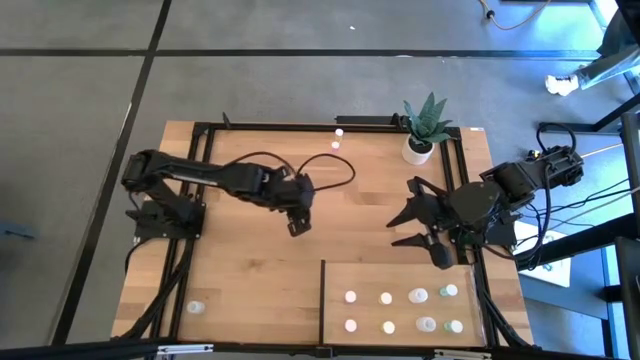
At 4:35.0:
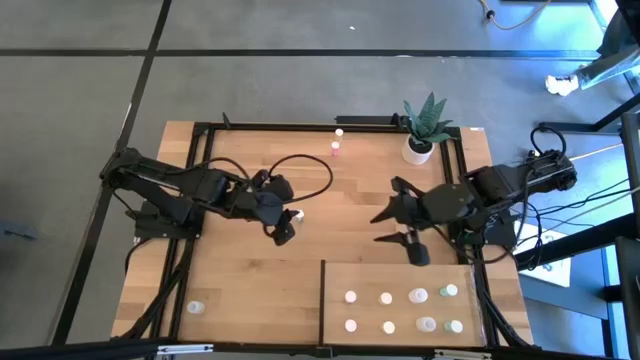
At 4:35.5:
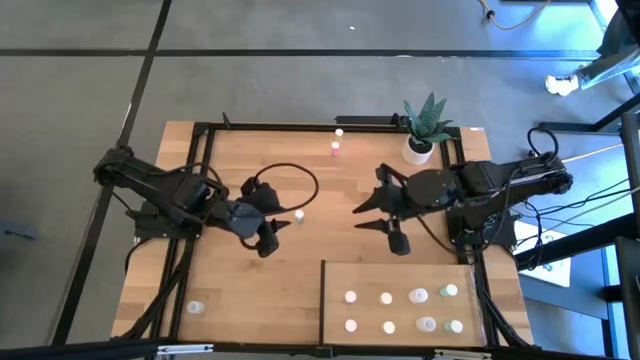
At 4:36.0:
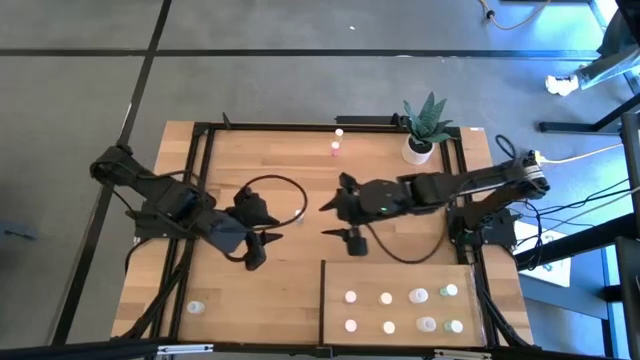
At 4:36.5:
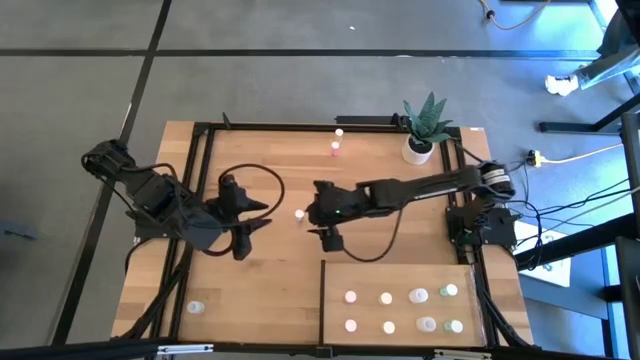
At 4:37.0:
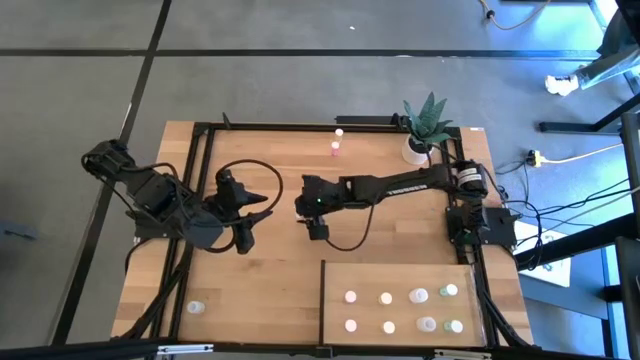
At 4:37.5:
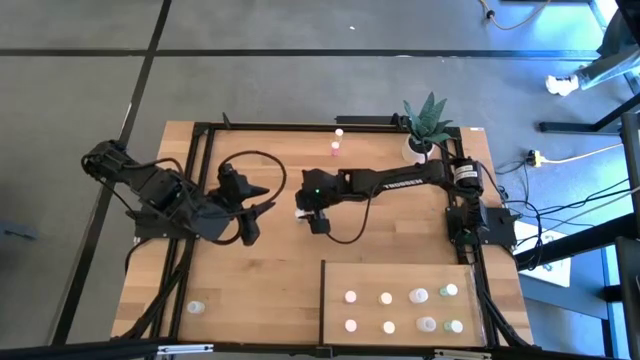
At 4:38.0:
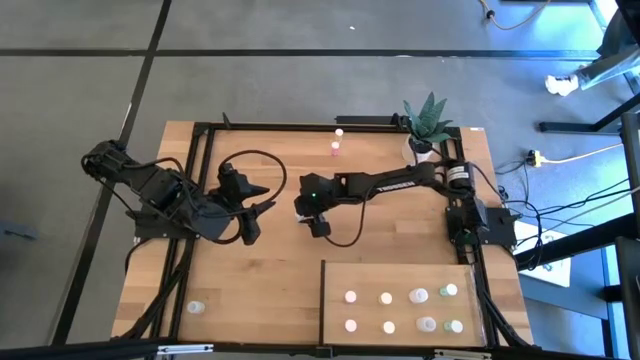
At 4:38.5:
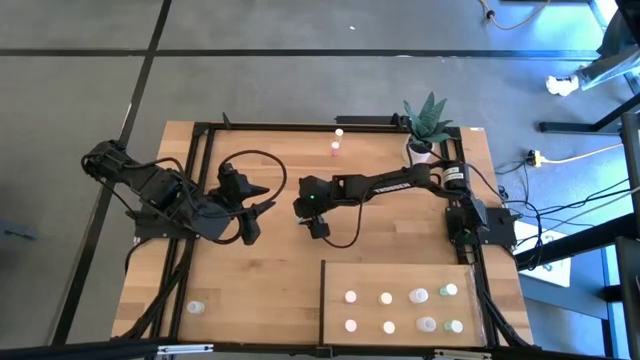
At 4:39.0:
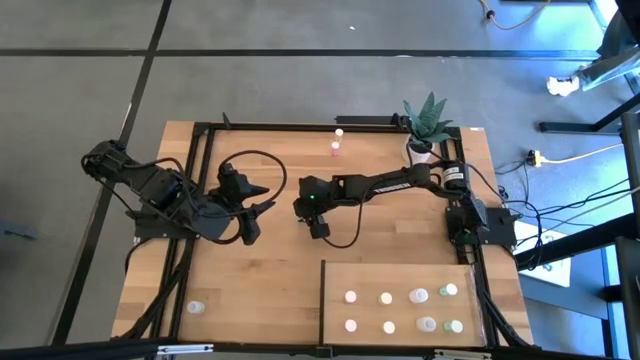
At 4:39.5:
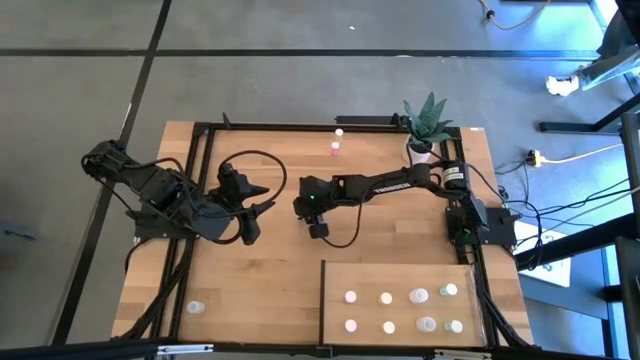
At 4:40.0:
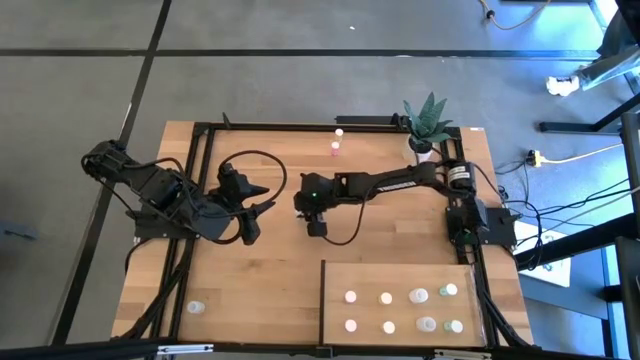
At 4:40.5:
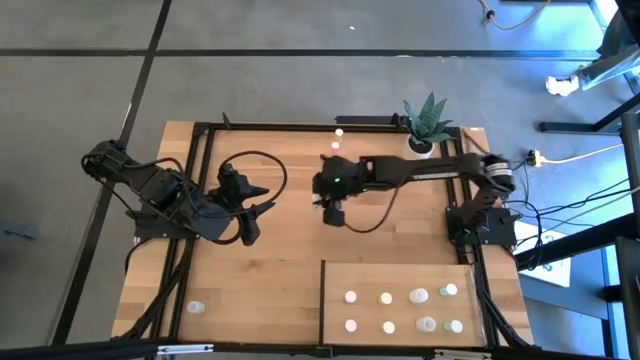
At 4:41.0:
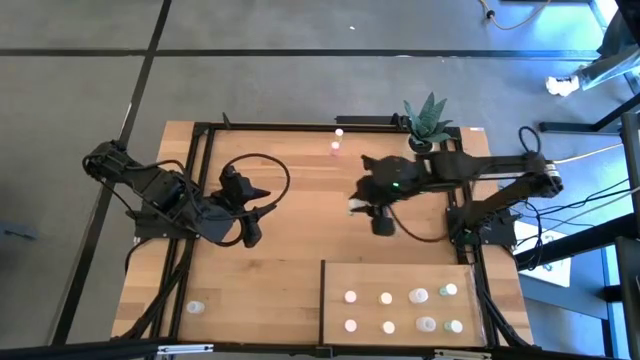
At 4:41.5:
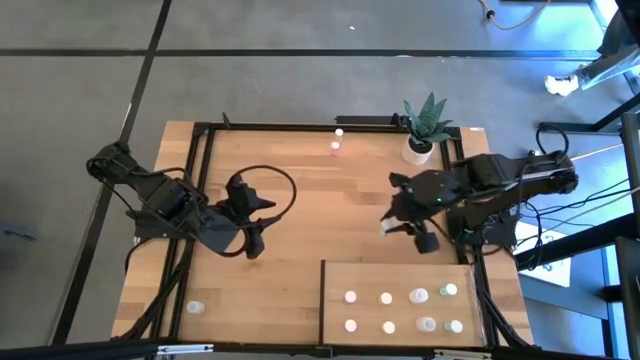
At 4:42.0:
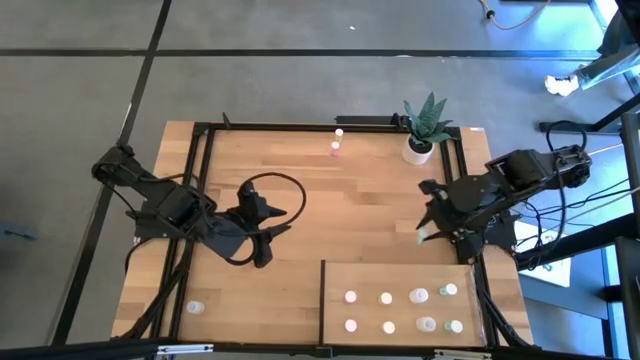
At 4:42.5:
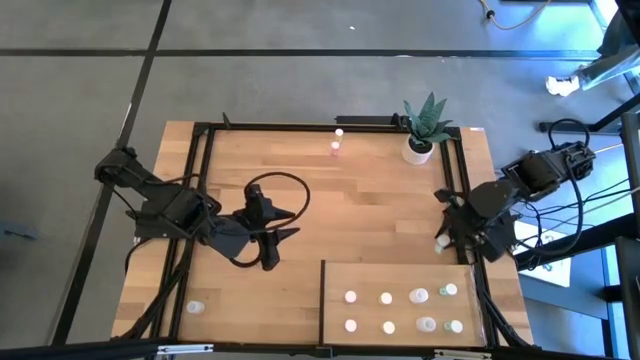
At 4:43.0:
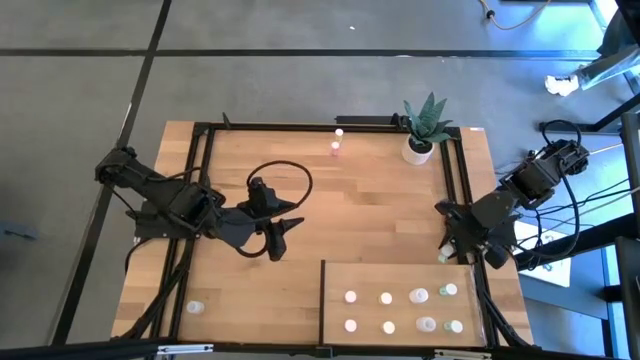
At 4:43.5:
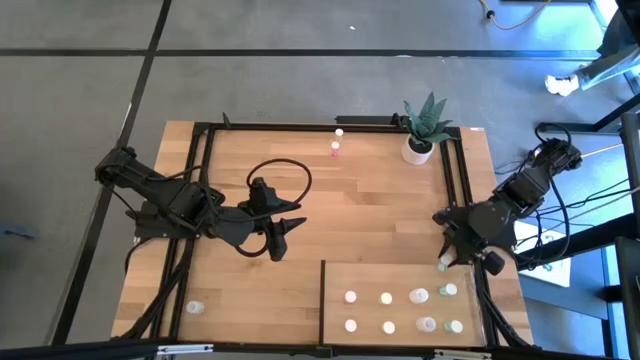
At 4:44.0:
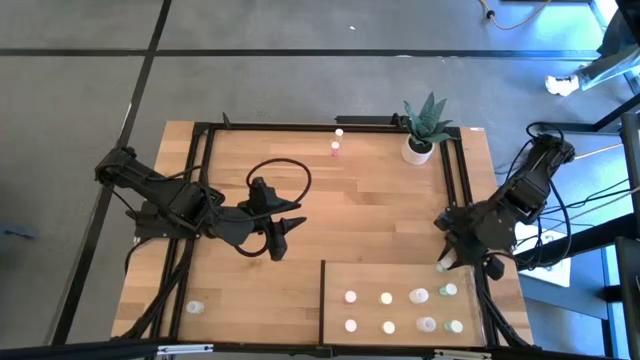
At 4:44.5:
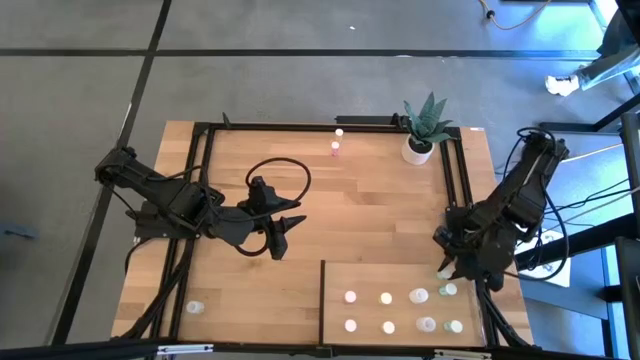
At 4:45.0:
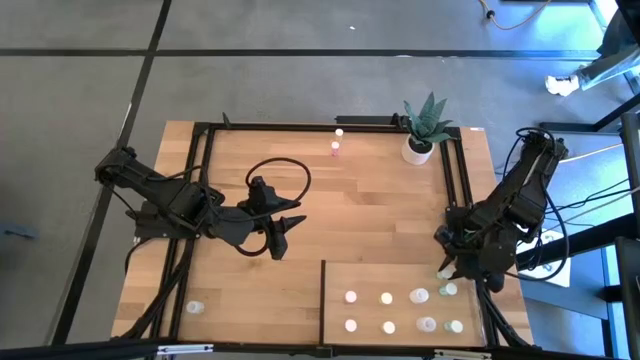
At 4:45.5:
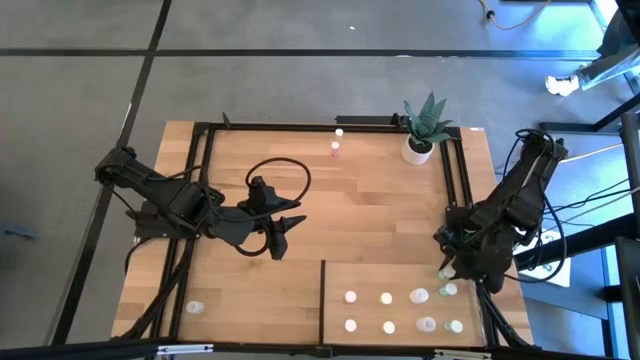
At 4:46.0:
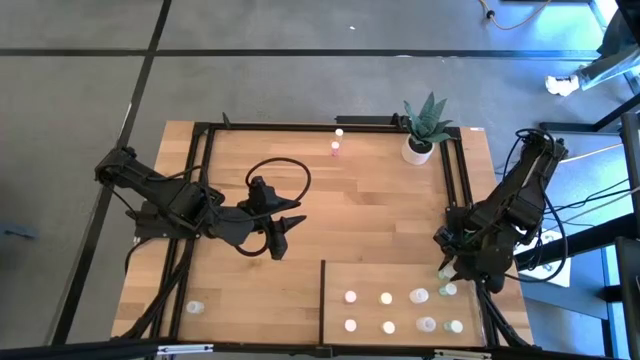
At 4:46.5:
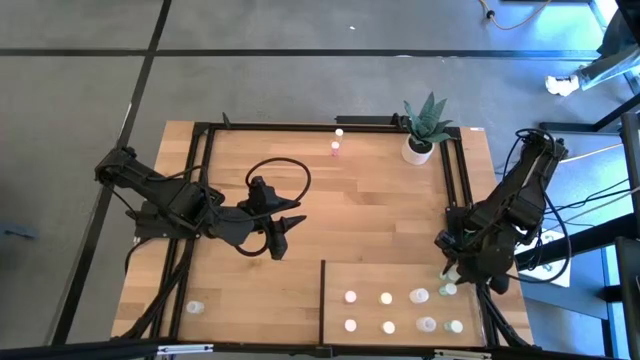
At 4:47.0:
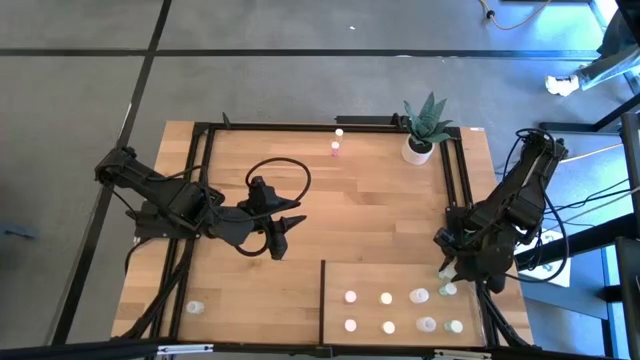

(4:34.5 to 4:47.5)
Task: Pick and place medicine bottles onto shelf by color
Put the blue pill bottle on the shelf aligned with the other blue pill bottle

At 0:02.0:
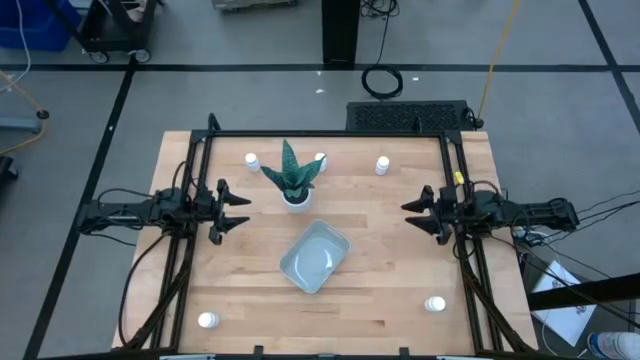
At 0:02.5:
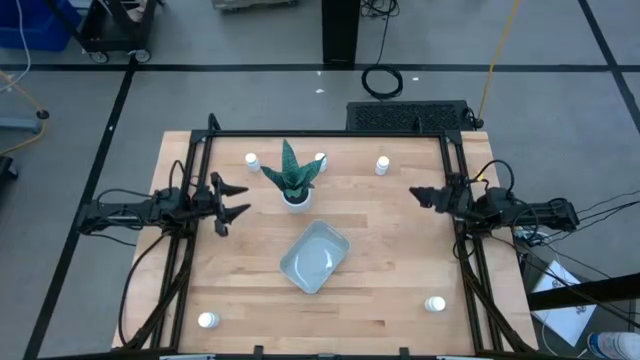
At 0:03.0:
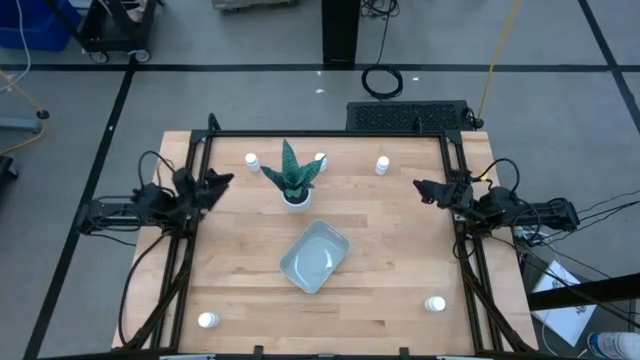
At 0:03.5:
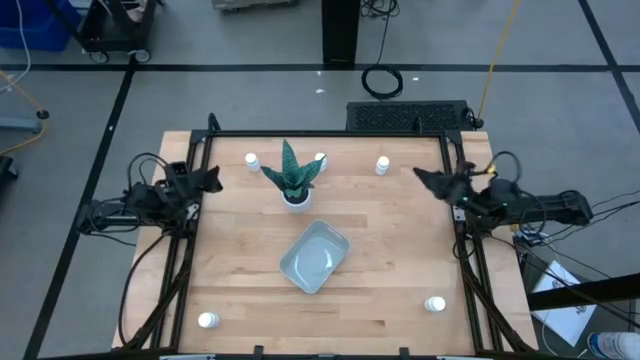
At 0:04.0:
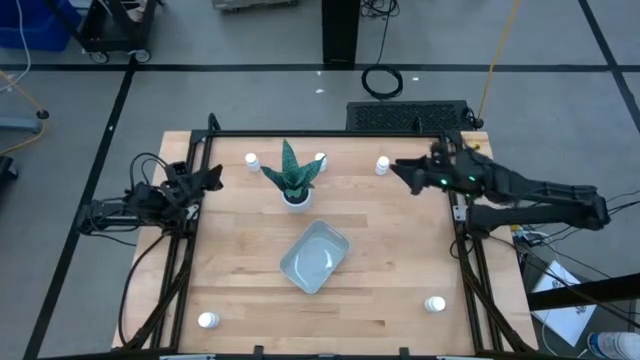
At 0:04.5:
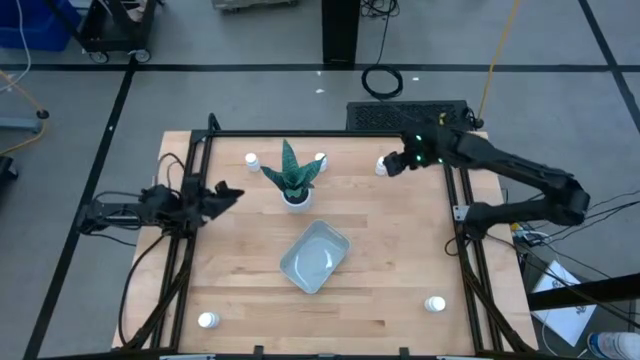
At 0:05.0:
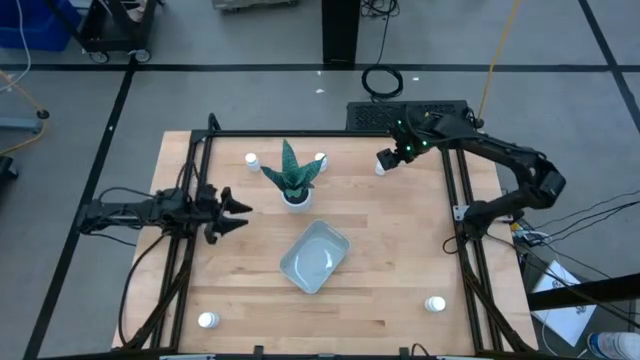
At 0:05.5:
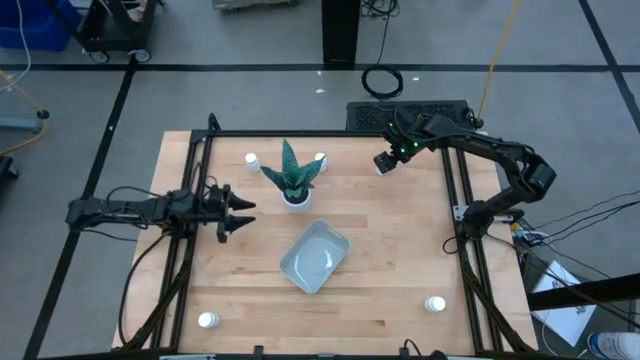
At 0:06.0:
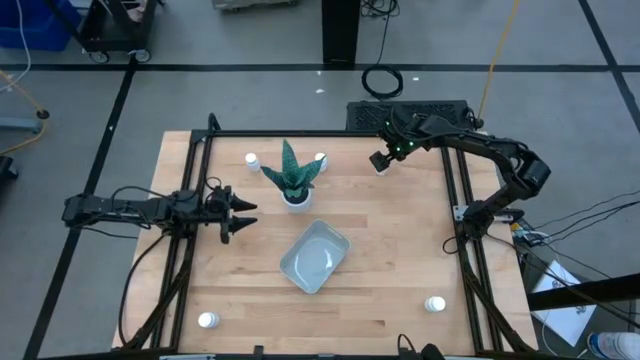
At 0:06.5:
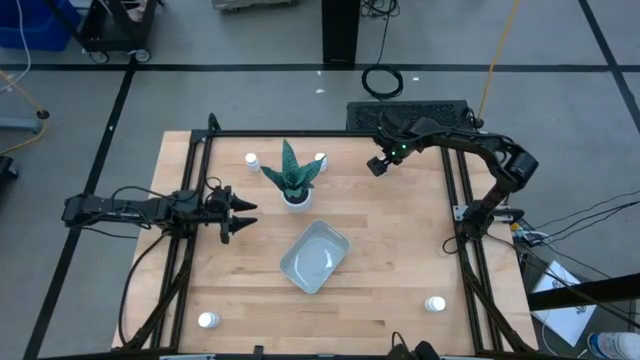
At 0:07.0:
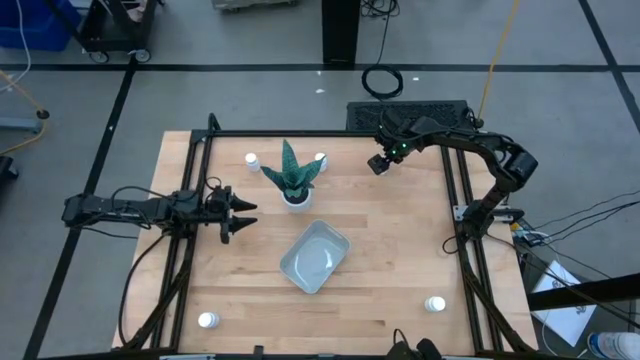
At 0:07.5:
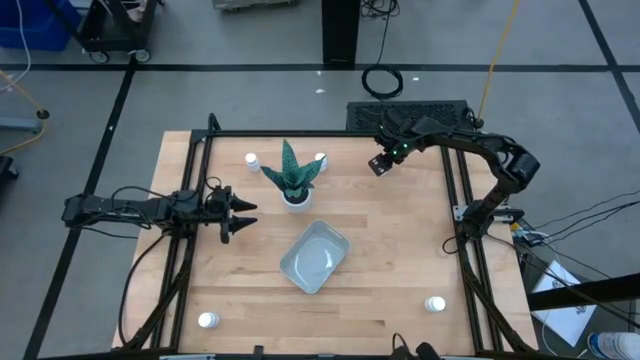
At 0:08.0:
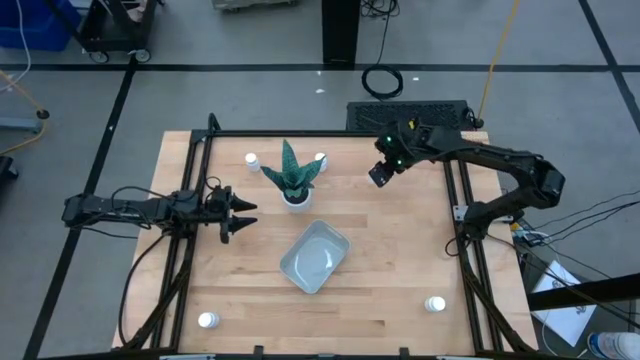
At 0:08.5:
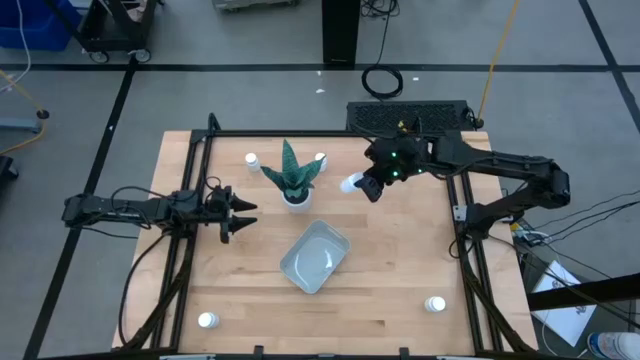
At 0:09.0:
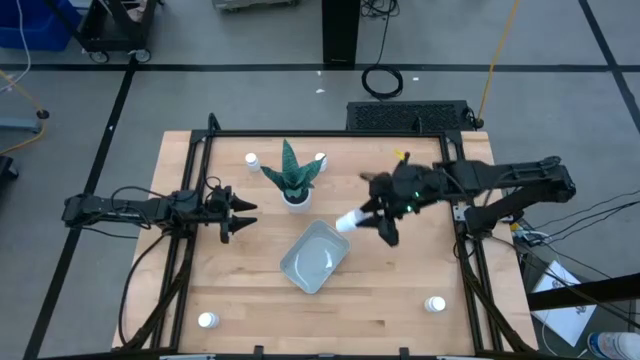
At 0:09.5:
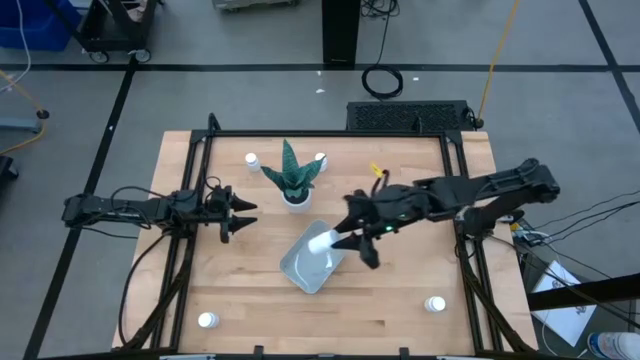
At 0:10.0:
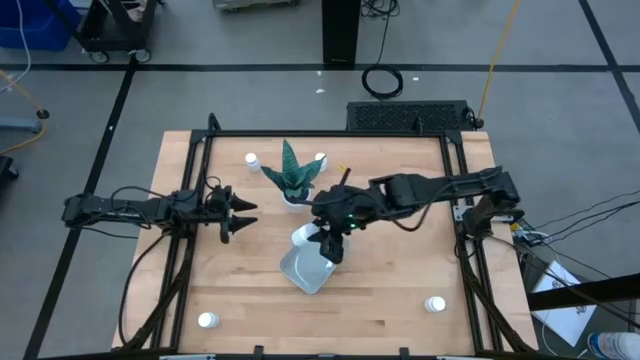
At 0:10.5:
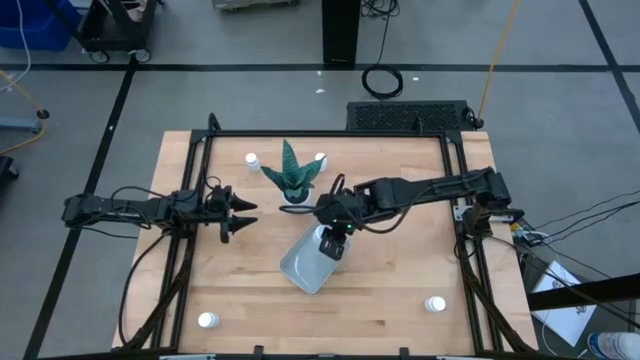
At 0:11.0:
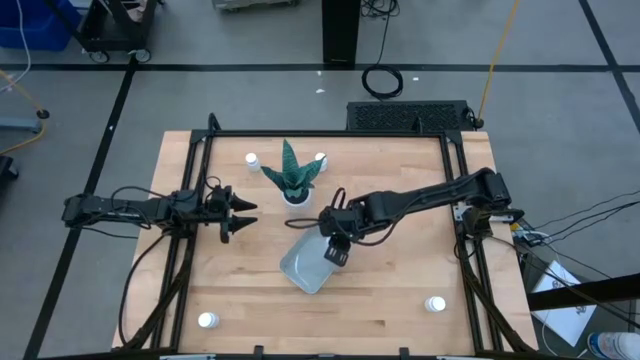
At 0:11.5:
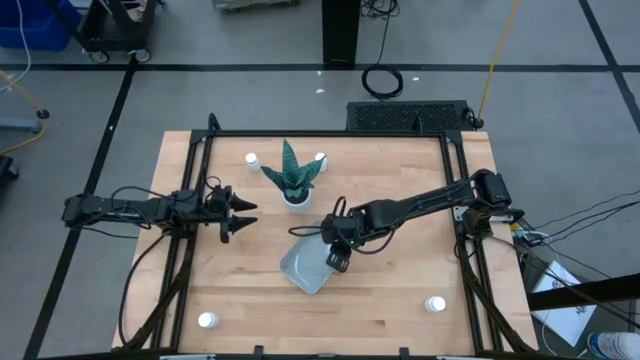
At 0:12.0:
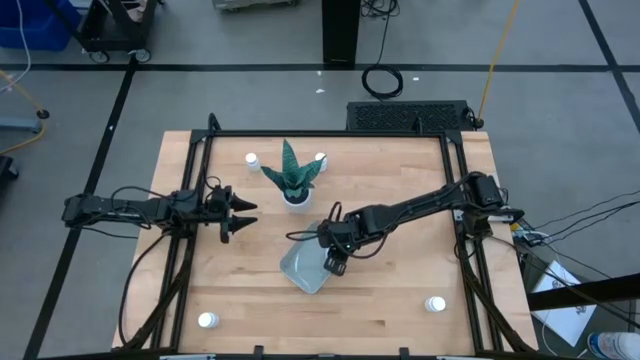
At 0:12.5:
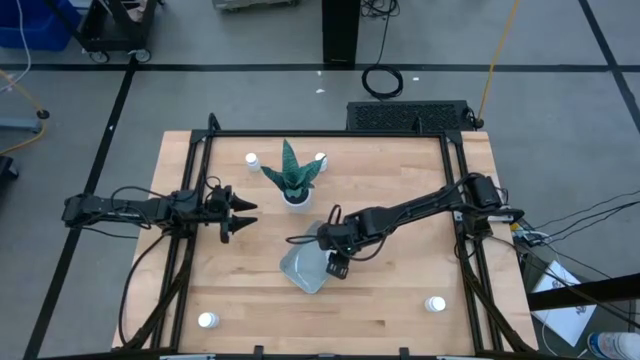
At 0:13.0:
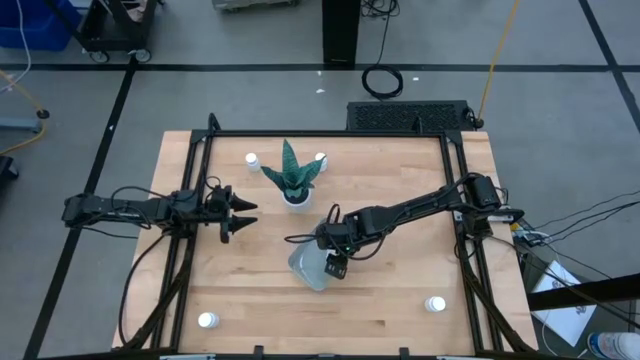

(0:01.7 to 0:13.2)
Task: Pick and place pill bottles into a basket
Put the white medicine bottle into the gray bin
